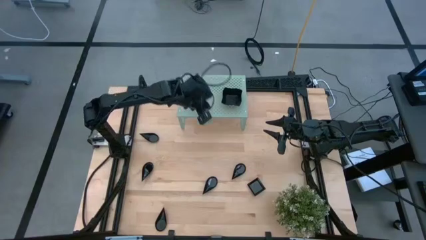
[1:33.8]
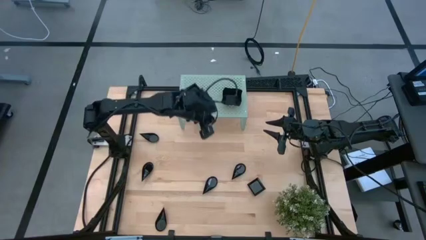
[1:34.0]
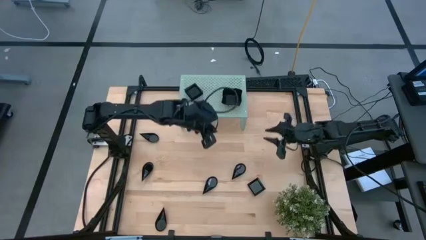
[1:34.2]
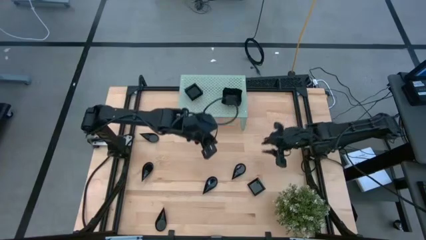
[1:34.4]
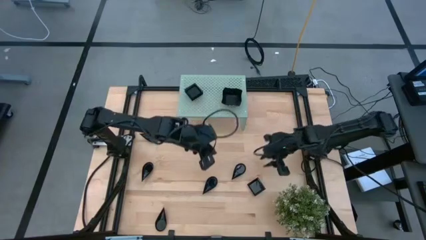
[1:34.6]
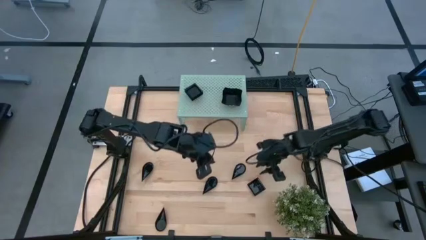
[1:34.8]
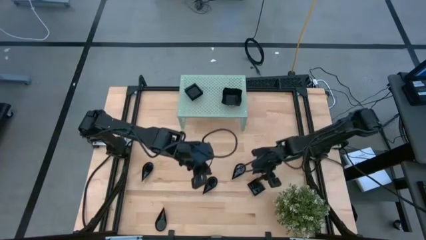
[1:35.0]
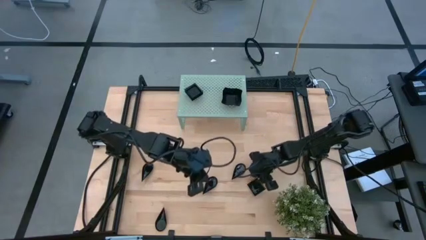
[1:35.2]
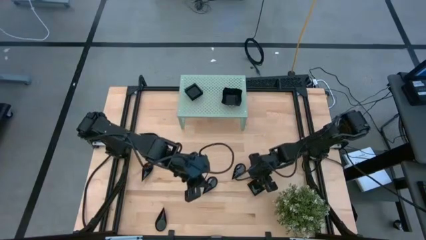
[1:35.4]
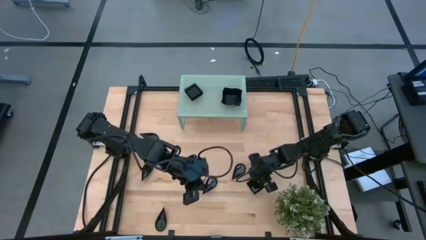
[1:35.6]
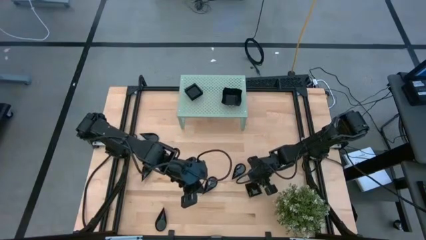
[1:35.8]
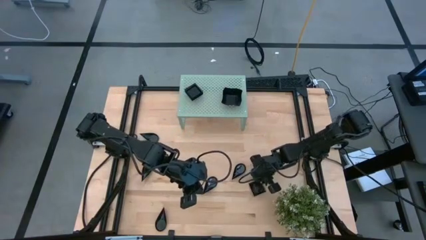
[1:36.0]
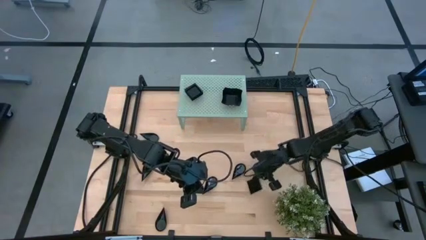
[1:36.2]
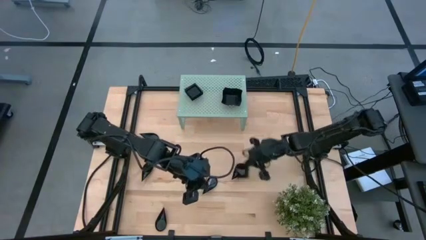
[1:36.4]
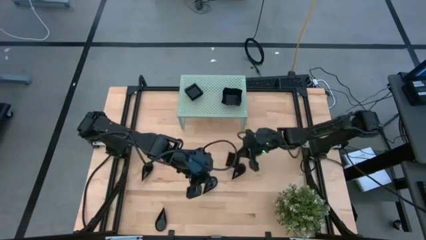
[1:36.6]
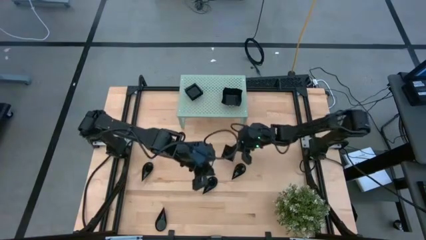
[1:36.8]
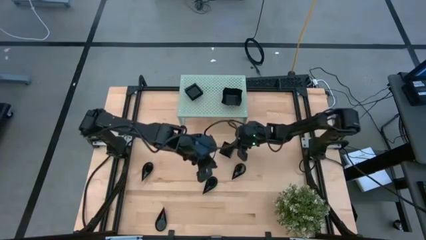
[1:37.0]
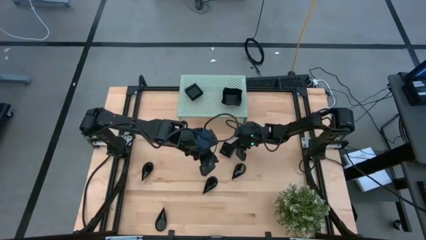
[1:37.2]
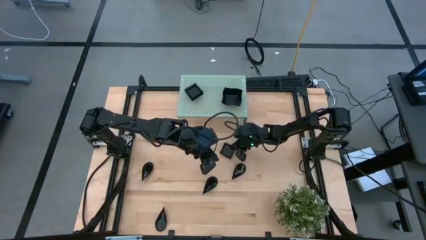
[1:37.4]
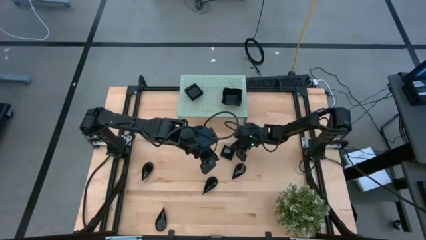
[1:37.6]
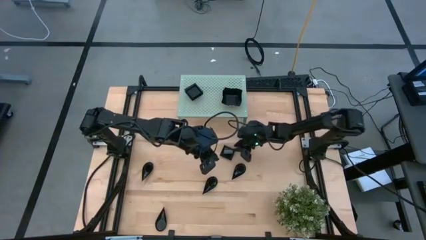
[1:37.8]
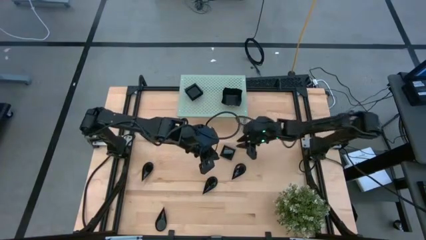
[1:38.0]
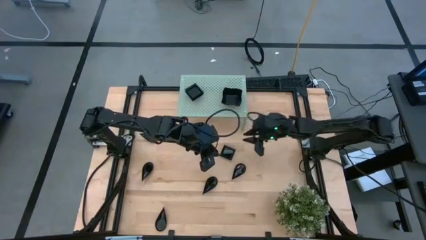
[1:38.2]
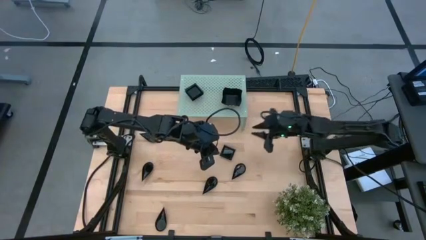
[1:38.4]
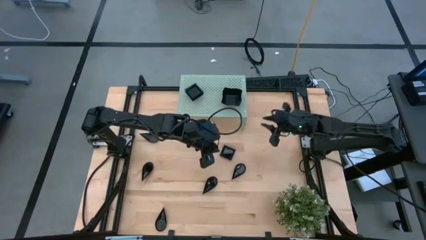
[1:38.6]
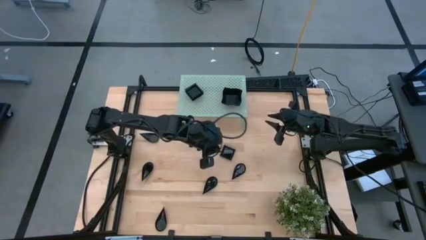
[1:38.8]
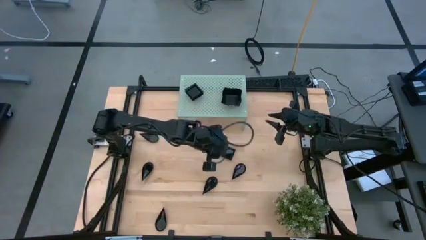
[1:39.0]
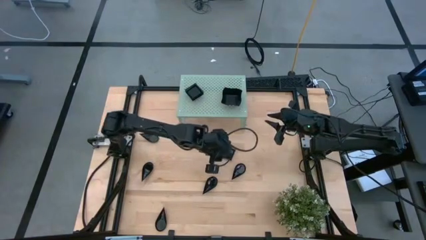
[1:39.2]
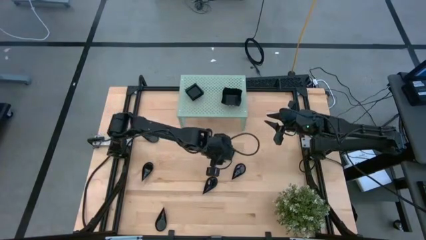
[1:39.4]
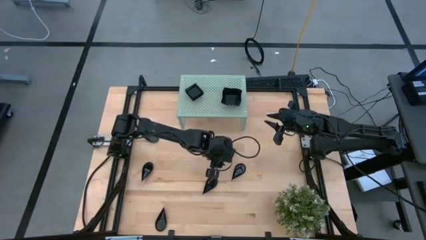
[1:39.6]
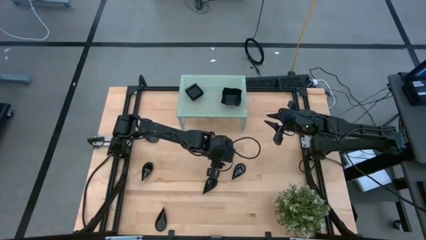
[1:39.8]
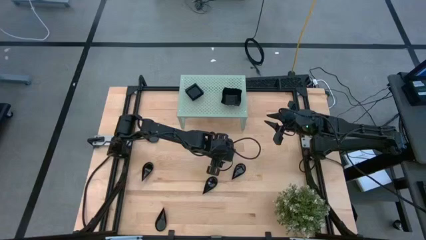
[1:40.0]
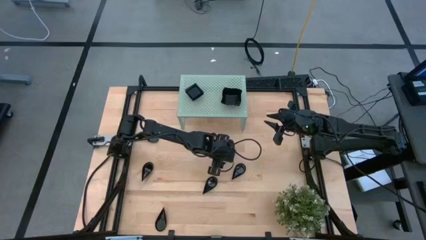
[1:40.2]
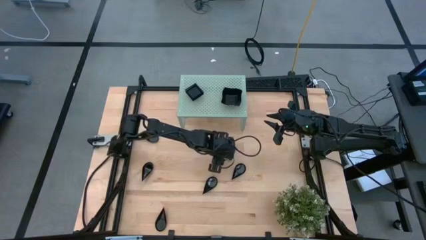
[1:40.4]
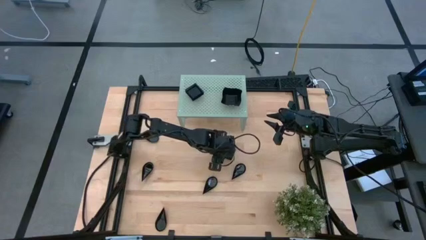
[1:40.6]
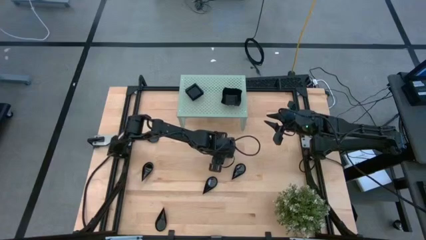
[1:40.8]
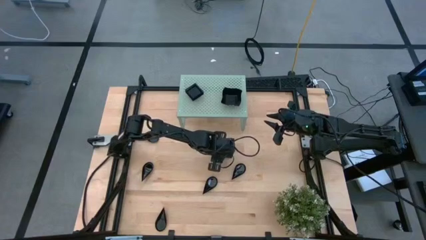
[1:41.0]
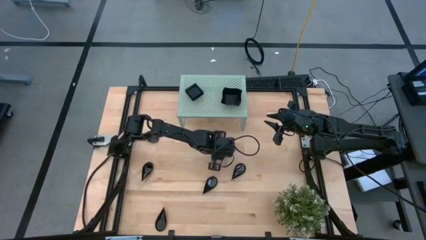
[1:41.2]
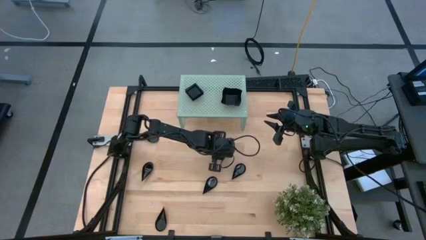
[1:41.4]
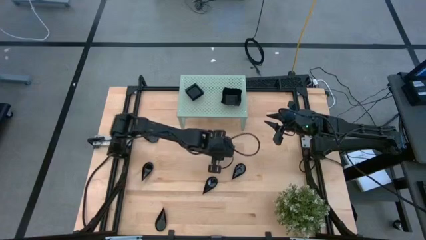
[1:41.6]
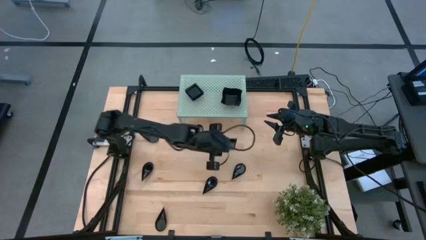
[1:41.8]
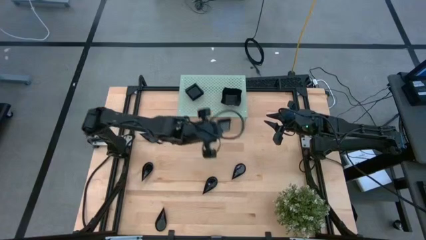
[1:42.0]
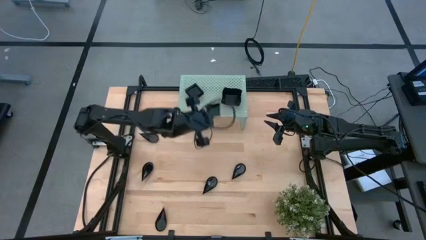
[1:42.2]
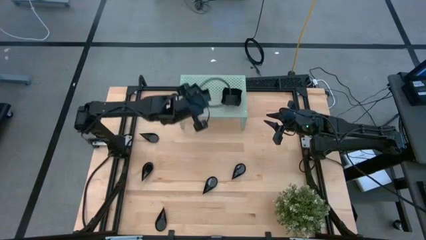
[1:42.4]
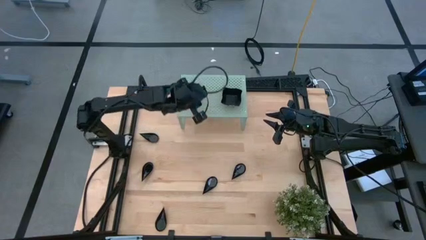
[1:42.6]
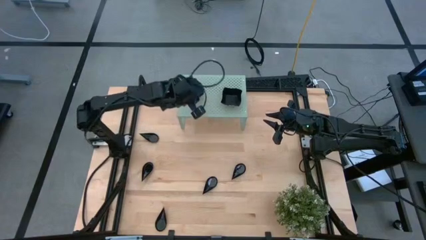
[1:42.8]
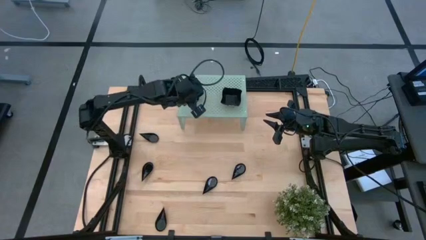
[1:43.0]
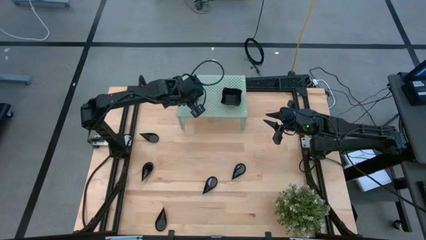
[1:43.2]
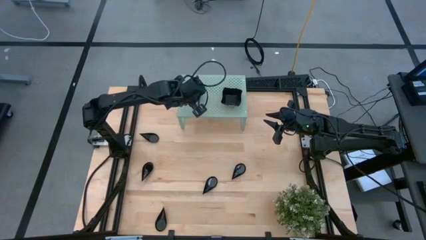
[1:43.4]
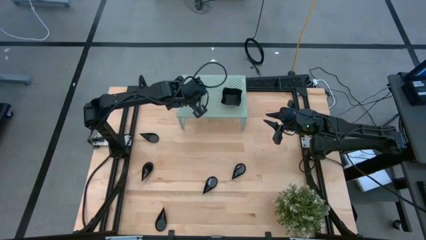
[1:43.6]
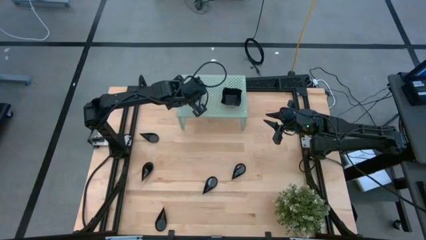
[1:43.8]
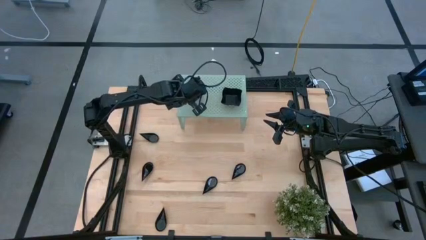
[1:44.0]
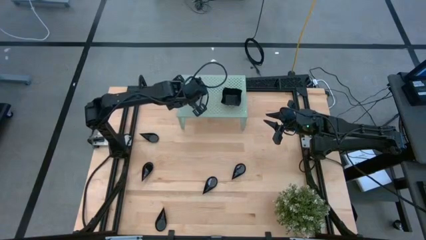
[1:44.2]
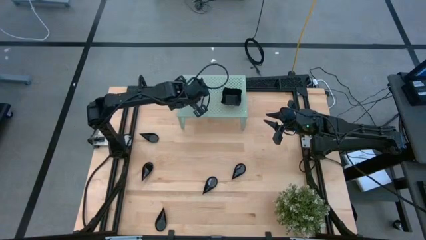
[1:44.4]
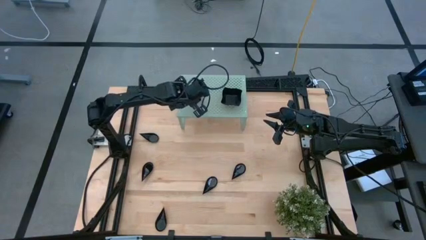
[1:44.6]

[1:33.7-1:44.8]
Task: Pick & Place Mini shaped plates
Stack the black square plate on top of the other black square plate on the shelf
